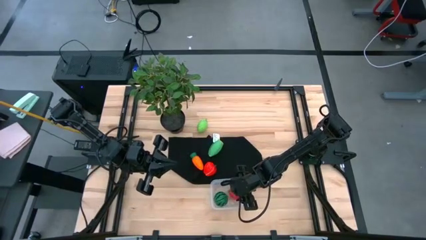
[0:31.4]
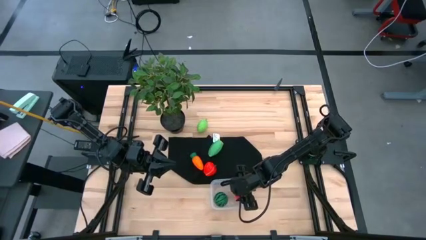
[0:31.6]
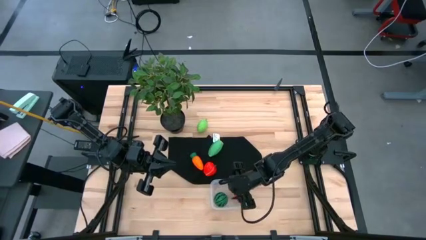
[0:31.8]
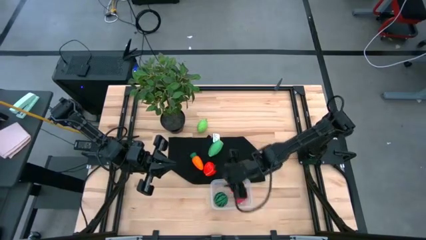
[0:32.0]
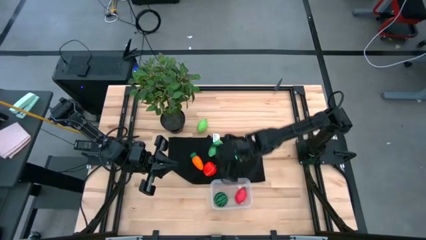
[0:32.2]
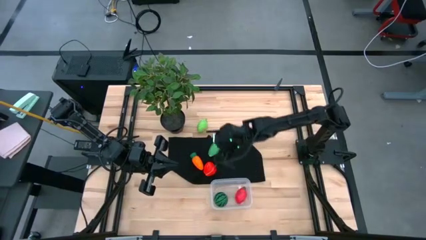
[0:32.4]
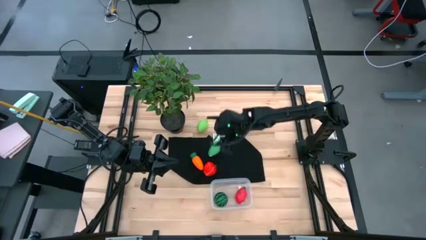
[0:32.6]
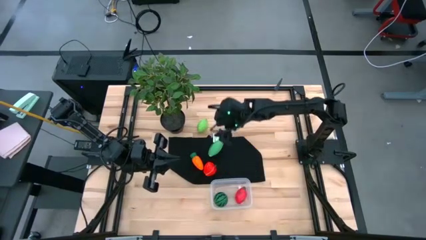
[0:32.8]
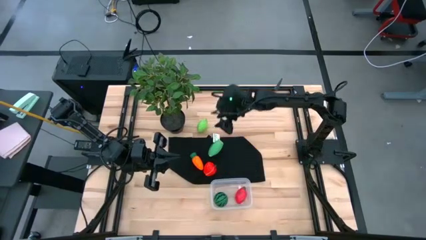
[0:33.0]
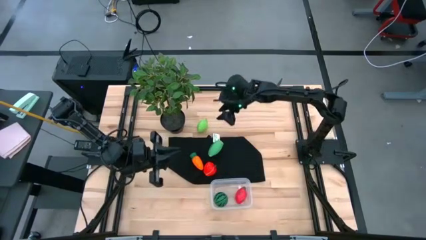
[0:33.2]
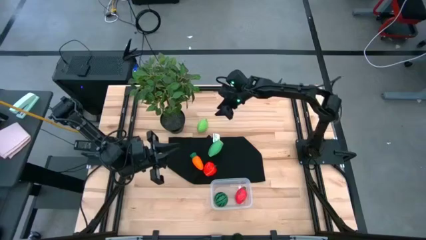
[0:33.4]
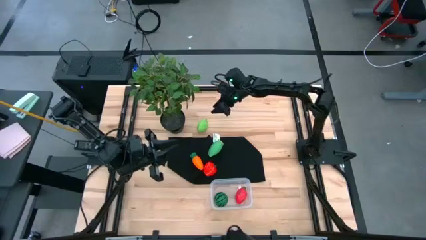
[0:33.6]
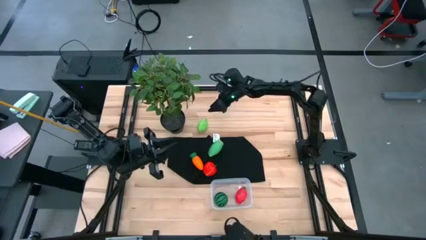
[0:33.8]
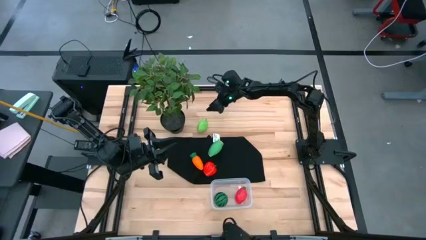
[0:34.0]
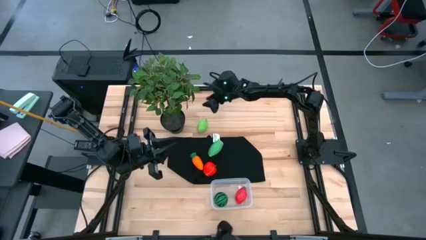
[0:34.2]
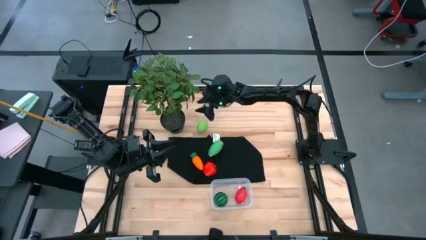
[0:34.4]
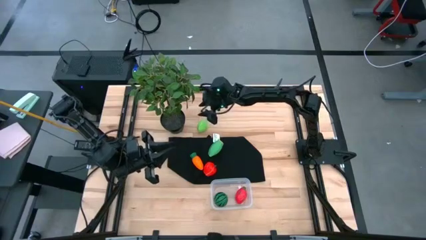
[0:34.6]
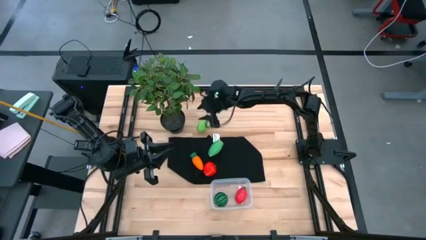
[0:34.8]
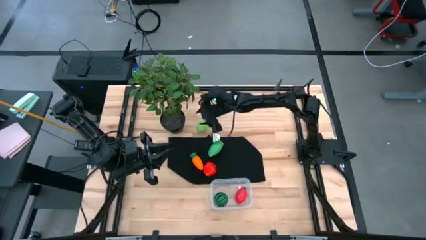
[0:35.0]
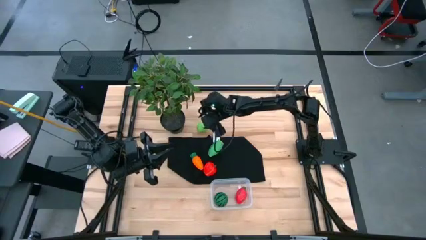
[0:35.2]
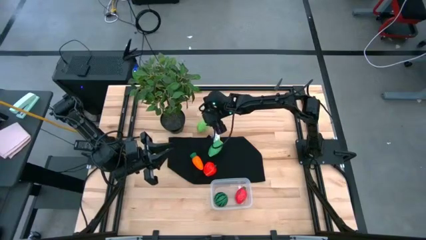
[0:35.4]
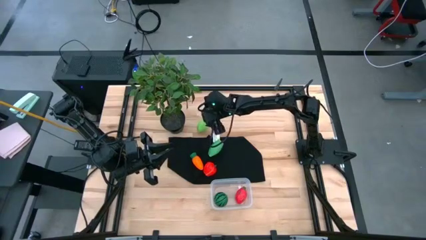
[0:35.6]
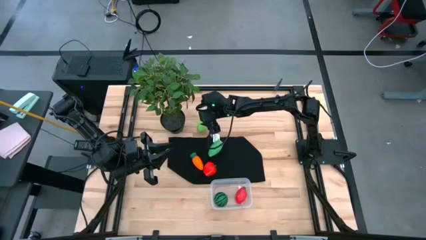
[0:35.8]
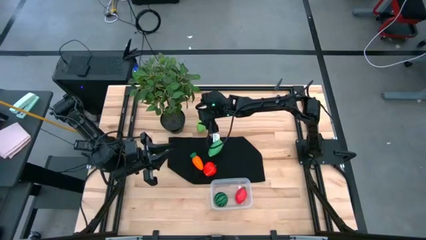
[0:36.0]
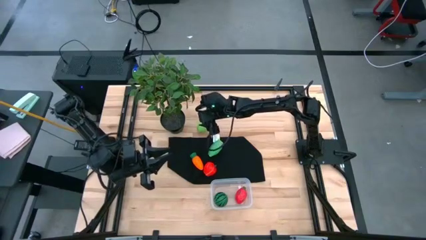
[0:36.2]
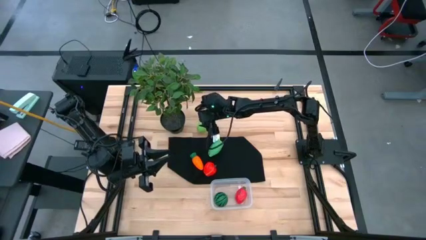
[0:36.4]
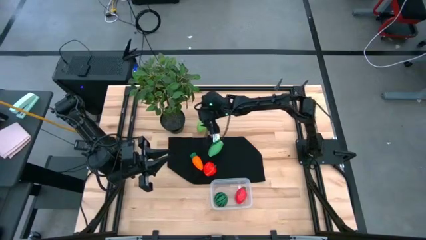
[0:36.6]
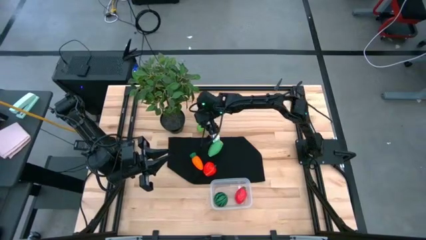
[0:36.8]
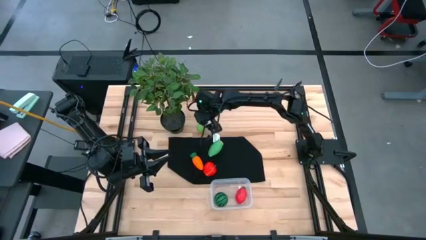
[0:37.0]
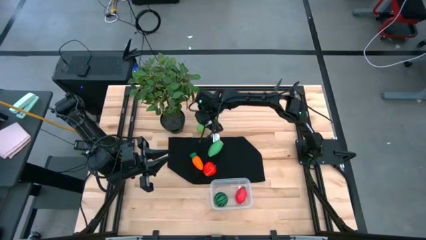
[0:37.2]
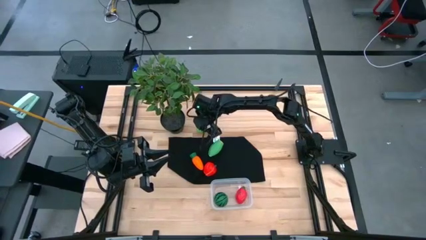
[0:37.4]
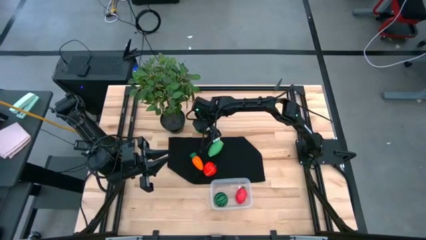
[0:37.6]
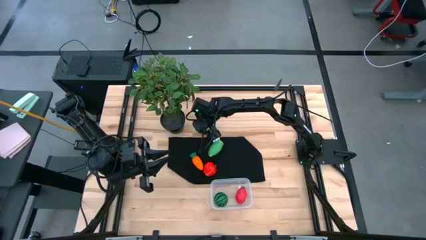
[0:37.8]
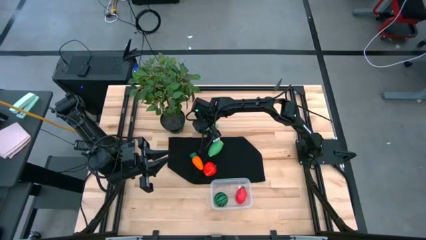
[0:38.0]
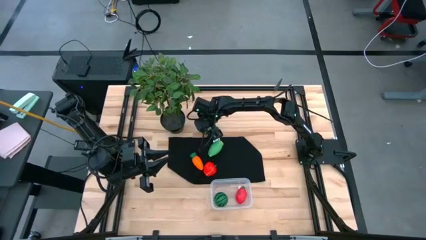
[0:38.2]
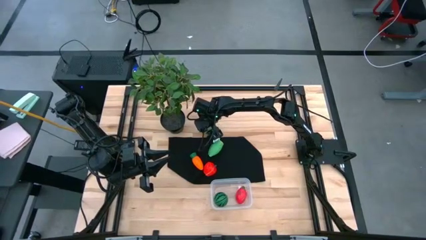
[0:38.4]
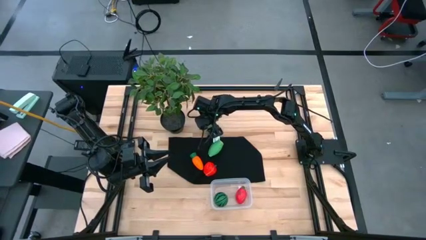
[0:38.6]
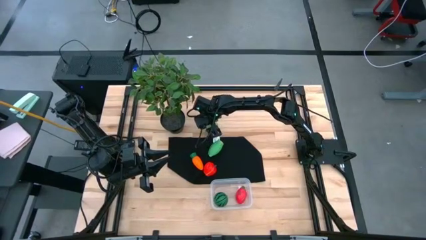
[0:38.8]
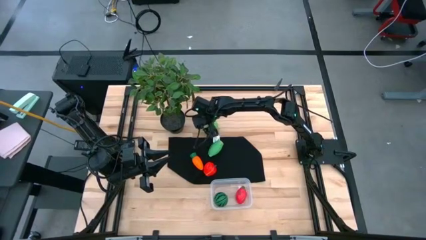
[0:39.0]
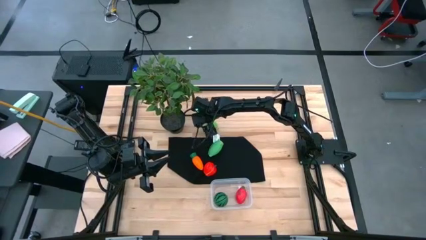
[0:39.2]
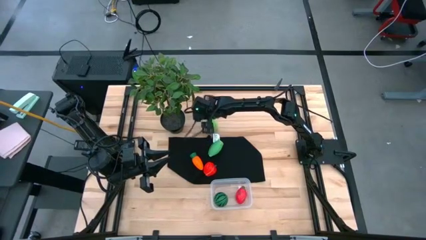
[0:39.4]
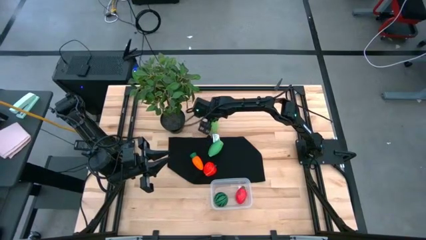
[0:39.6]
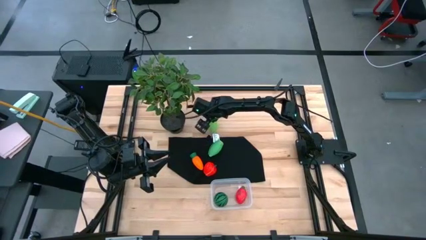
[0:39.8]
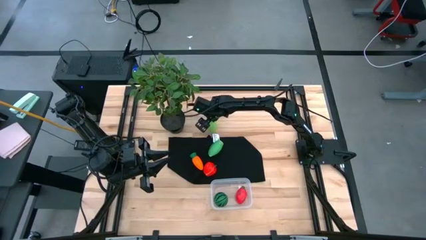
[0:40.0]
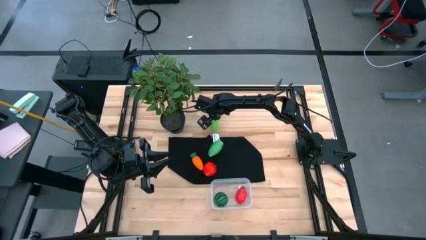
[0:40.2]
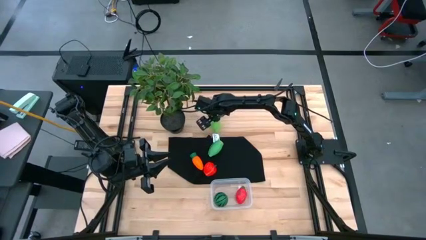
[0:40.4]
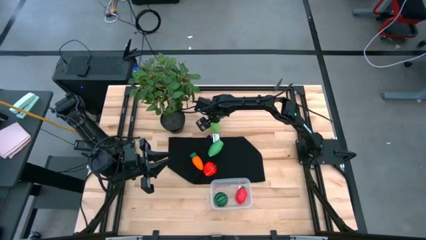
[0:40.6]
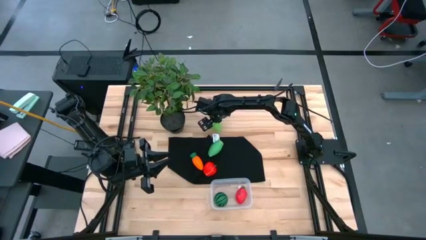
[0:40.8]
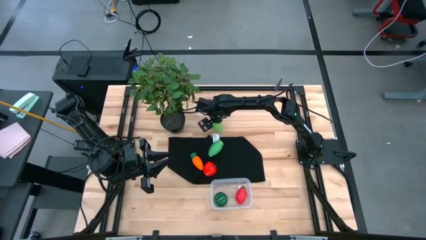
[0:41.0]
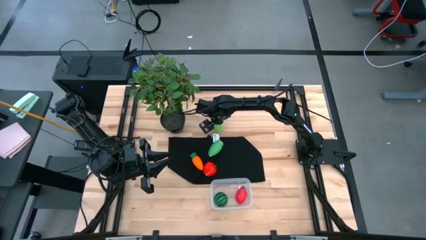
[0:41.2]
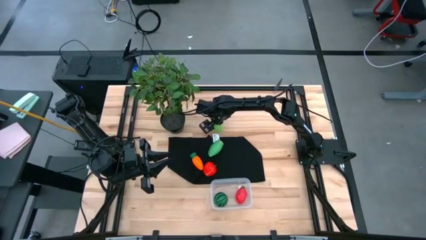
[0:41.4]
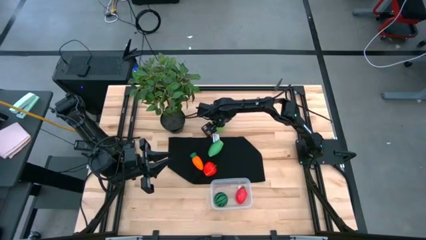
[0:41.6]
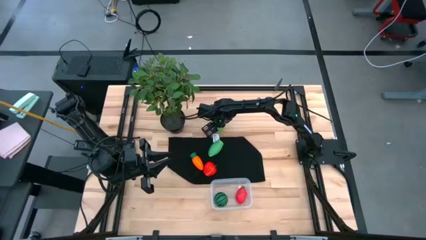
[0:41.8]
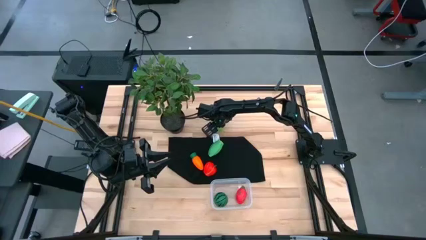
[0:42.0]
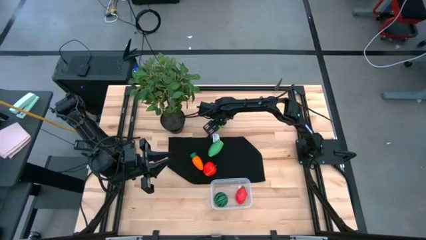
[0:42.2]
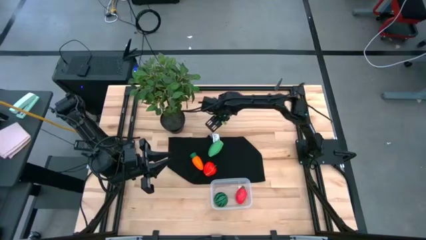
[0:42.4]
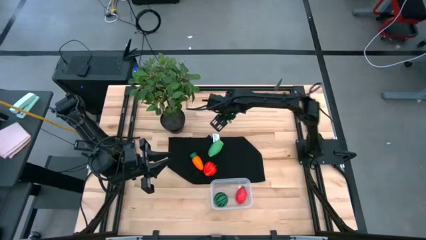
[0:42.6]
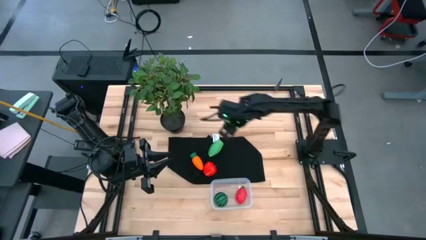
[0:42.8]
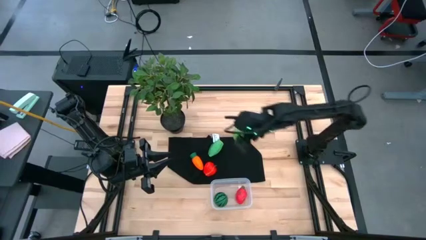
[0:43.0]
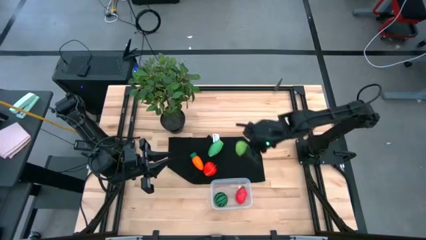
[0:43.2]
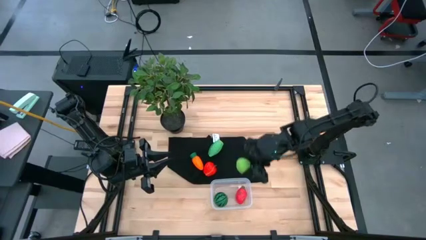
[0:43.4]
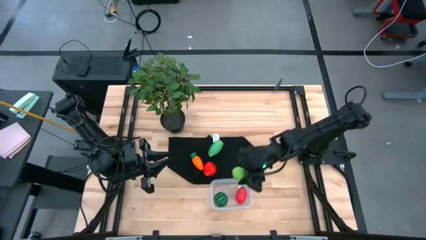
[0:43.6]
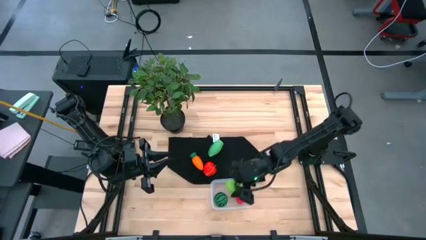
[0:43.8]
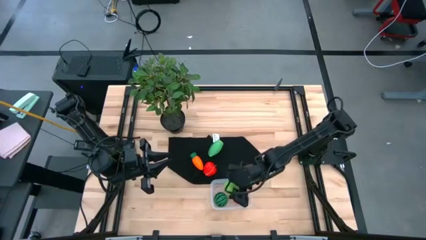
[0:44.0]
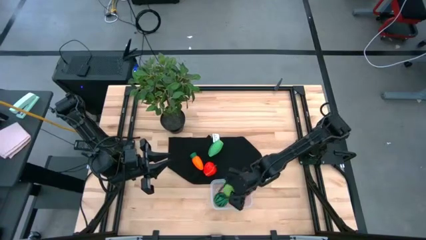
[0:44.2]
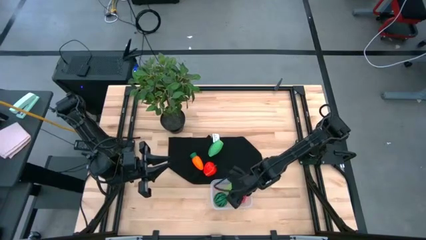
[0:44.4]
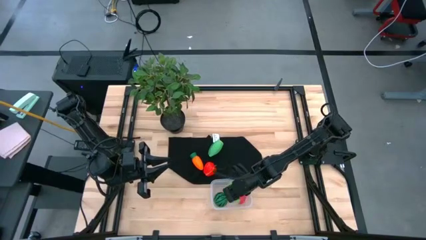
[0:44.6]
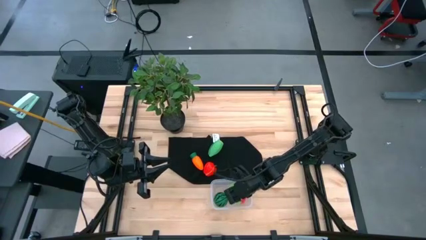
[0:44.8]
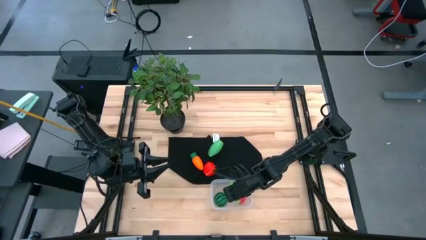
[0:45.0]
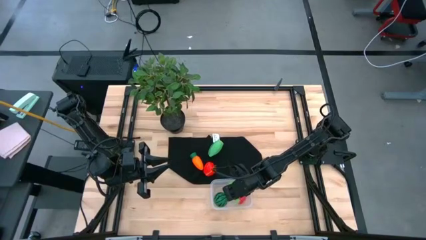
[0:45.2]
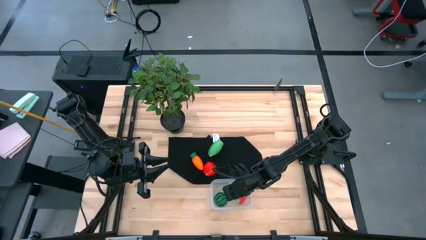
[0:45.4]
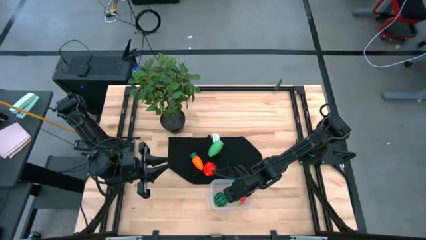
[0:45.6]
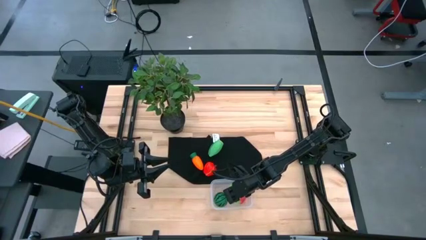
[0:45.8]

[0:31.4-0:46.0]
Task: Pick and placing Produce into tupperware
Put the melon into the transparent bin

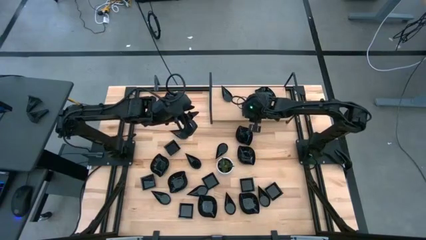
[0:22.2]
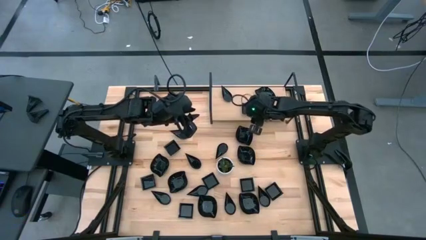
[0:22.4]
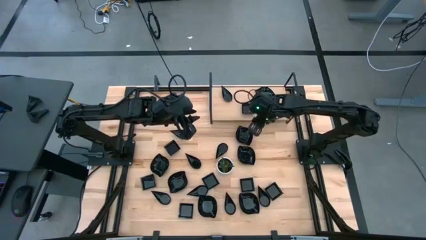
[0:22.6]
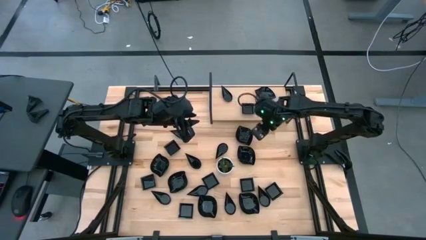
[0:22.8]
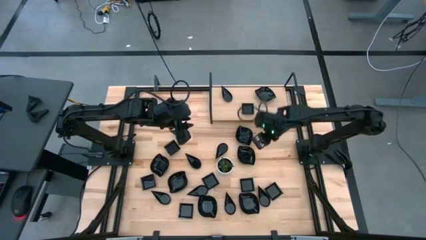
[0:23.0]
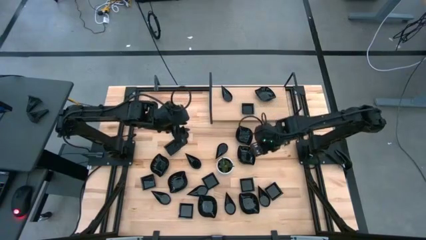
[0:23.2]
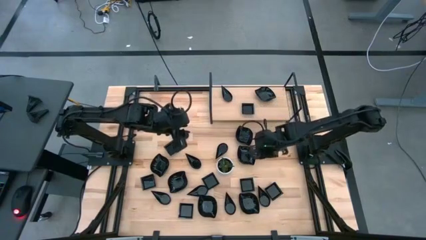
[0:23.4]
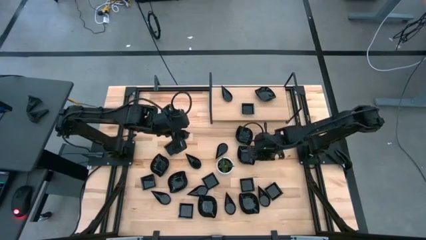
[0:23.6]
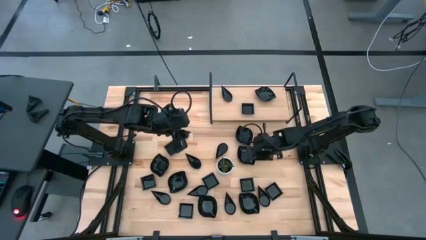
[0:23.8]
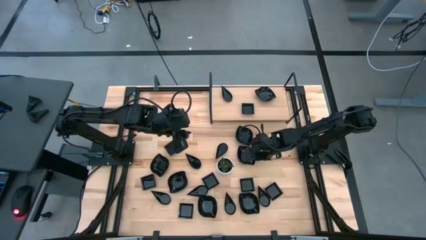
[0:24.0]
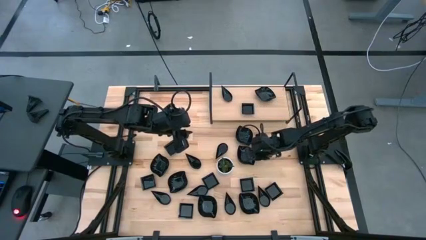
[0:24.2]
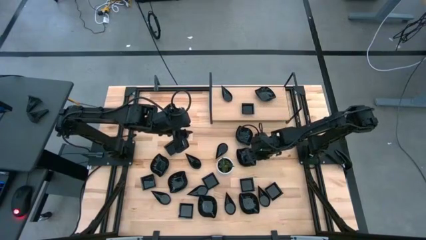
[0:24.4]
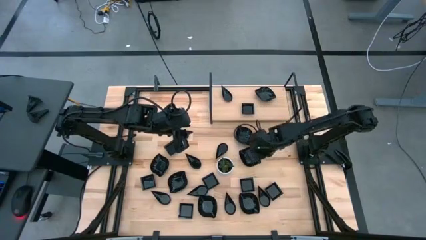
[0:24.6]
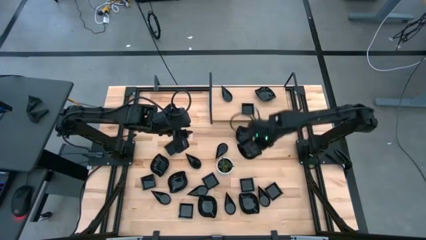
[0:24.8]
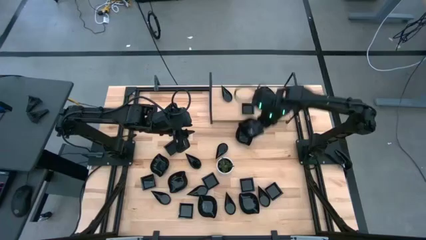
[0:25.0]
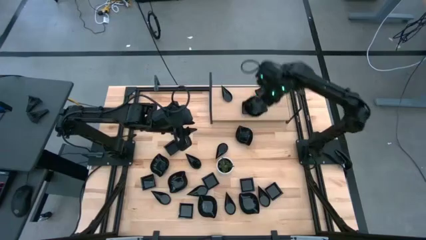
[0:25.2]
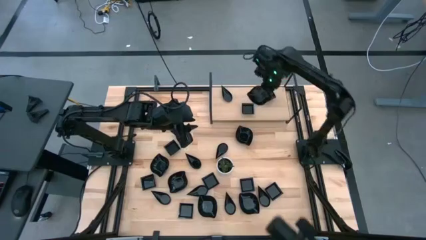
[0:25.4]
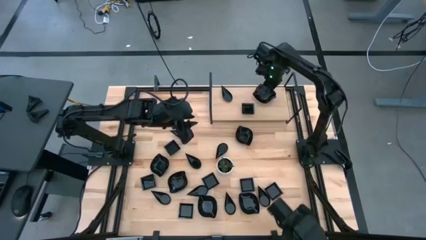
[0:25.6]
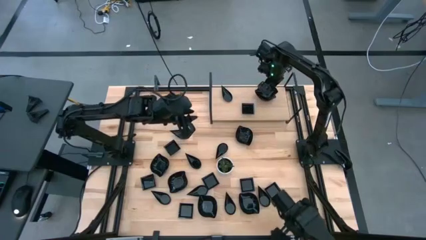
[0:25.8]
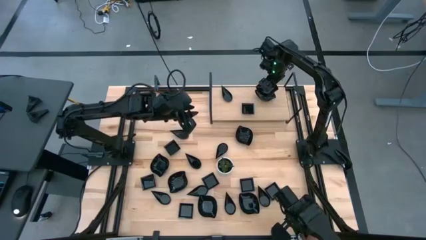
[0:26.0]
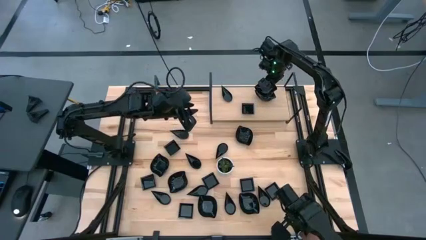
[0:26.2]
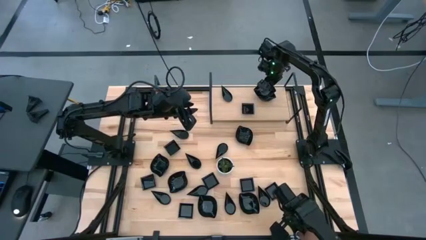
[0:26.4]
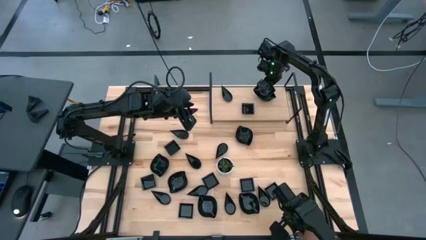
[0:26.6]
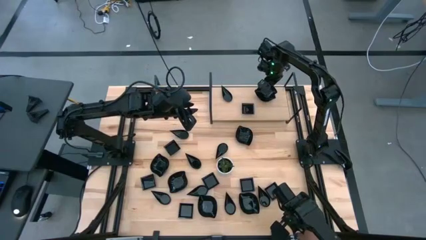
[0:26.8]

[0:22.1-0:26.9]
Task: Pick & Place Mini shaped plates
Stack the leaf shaped plate on top of the leaf shaped plate on the shelf
